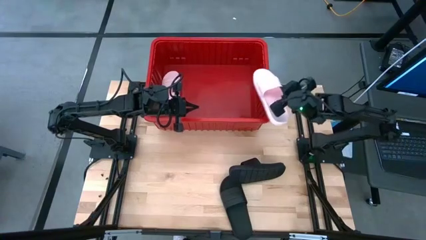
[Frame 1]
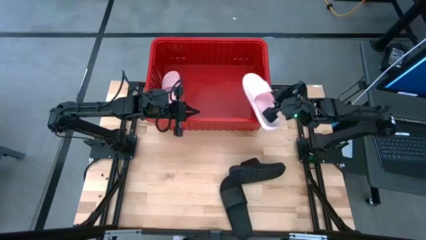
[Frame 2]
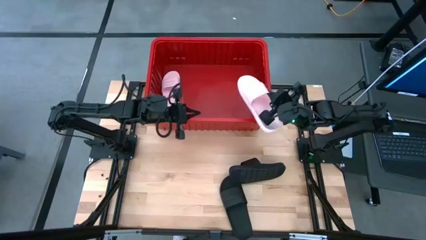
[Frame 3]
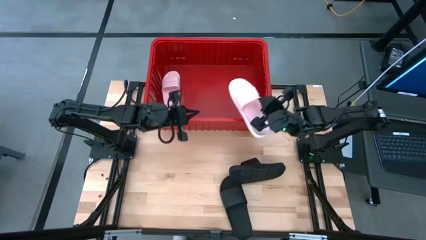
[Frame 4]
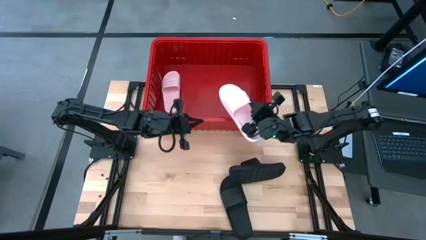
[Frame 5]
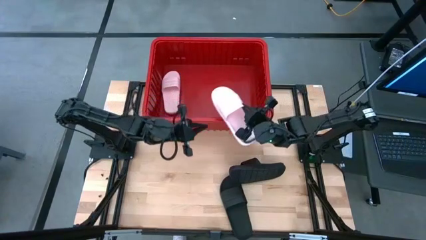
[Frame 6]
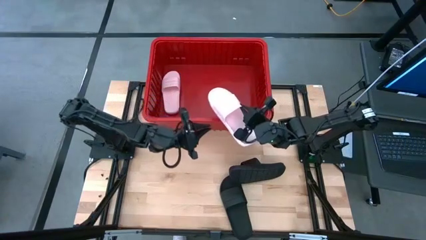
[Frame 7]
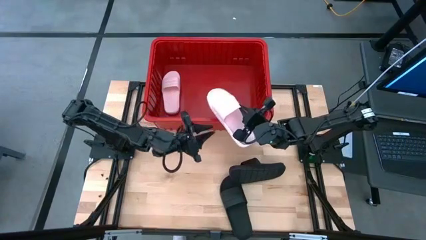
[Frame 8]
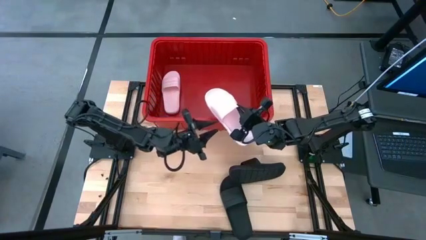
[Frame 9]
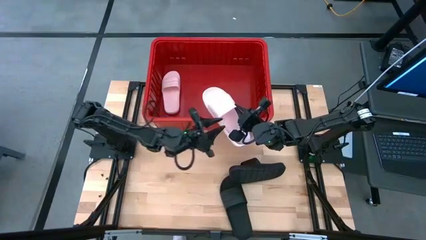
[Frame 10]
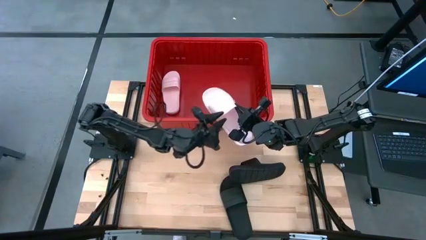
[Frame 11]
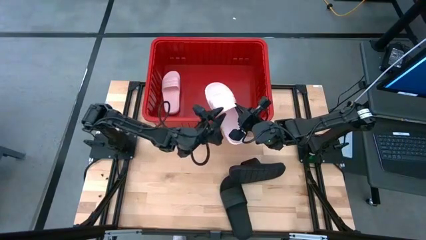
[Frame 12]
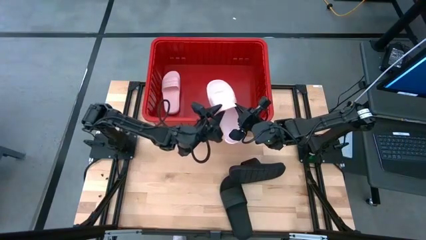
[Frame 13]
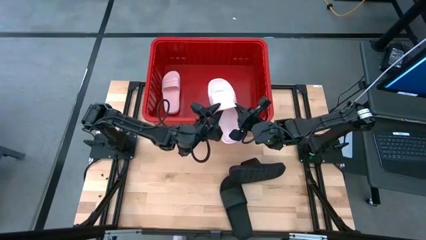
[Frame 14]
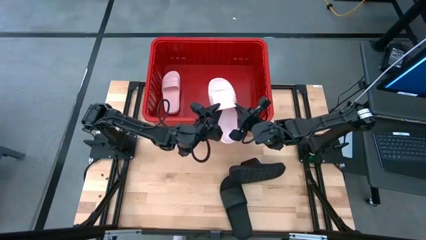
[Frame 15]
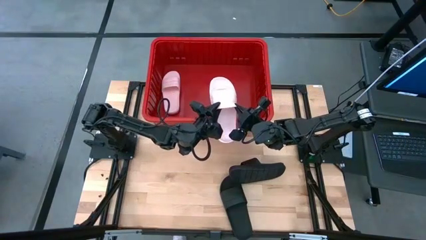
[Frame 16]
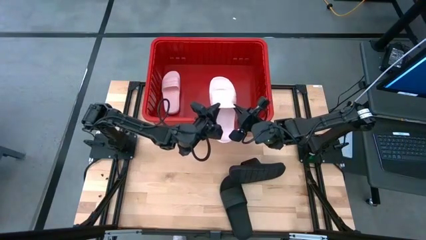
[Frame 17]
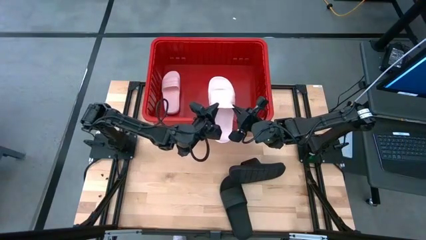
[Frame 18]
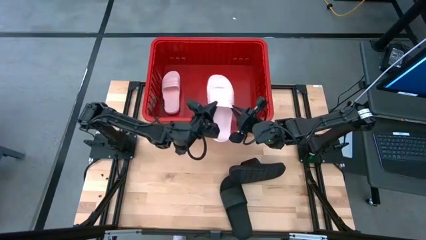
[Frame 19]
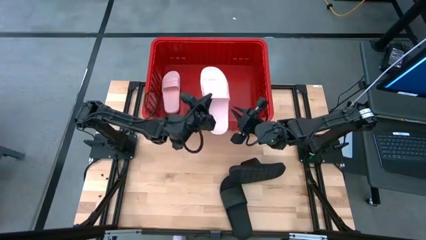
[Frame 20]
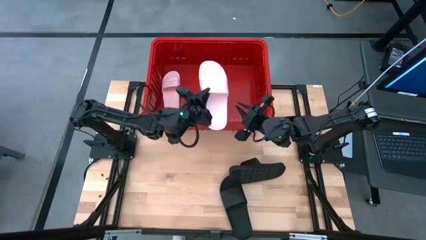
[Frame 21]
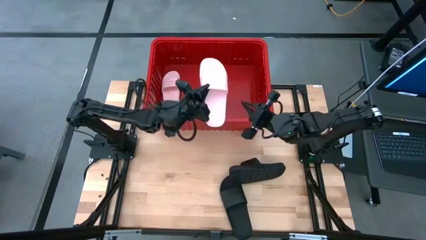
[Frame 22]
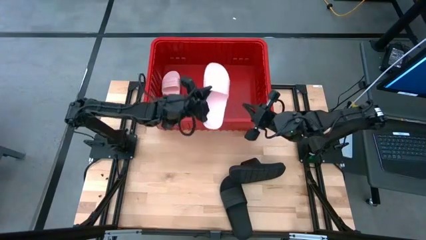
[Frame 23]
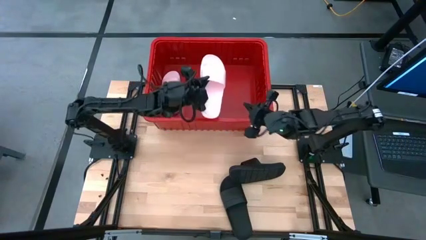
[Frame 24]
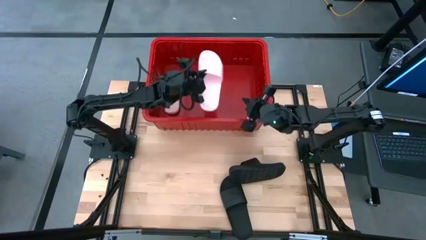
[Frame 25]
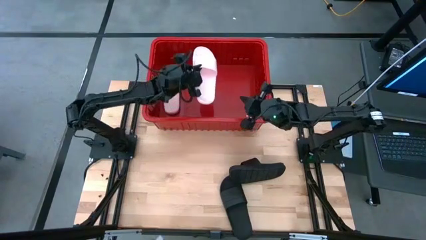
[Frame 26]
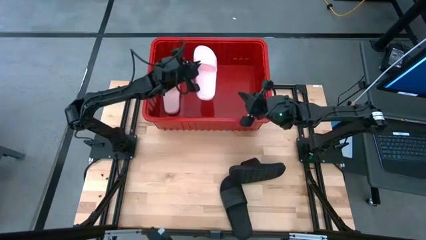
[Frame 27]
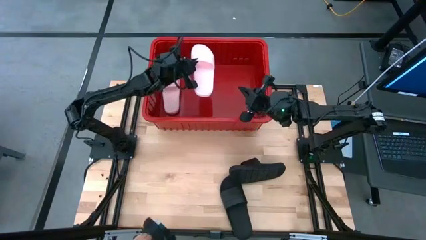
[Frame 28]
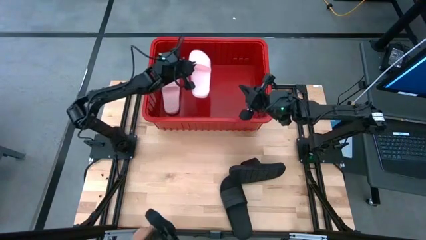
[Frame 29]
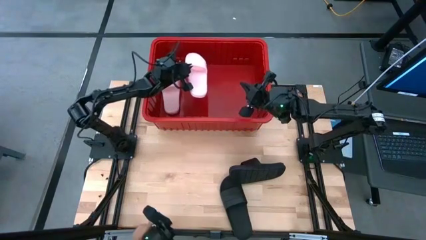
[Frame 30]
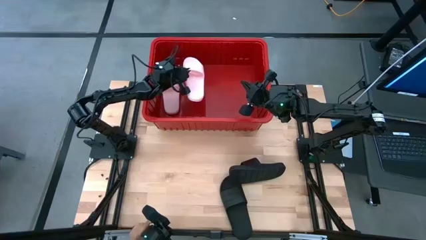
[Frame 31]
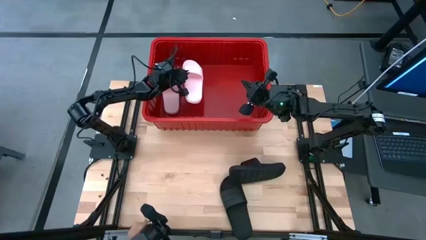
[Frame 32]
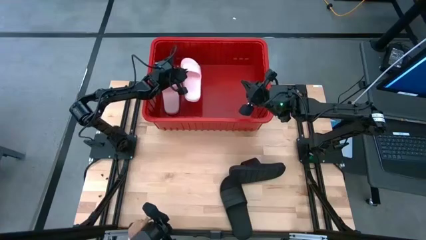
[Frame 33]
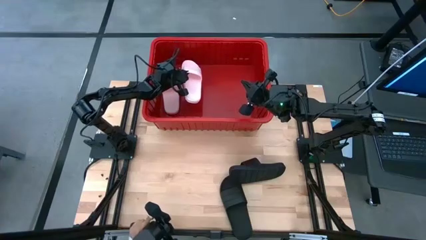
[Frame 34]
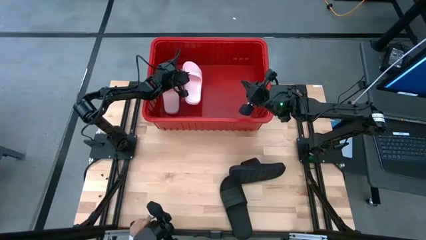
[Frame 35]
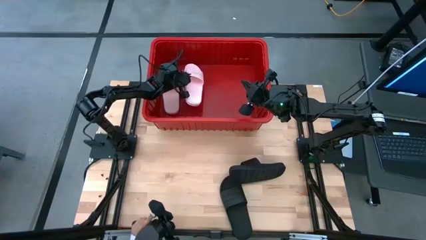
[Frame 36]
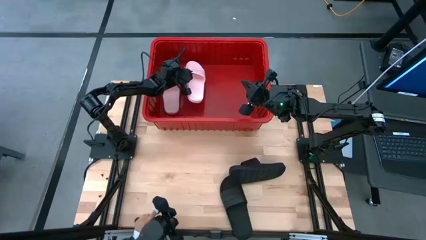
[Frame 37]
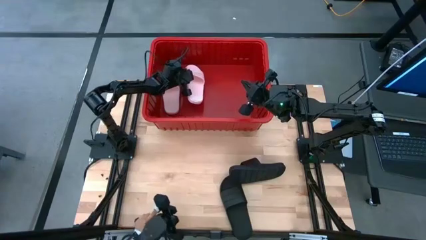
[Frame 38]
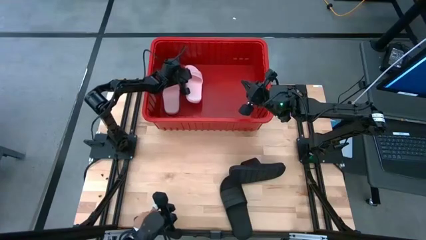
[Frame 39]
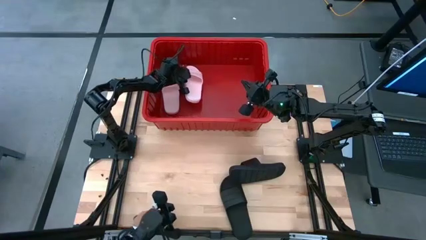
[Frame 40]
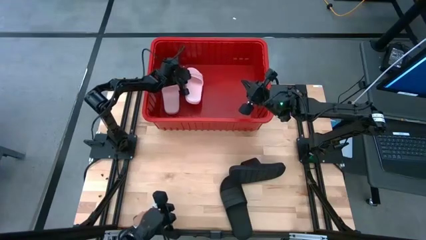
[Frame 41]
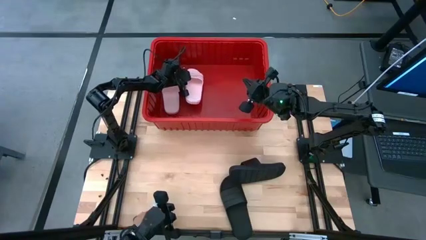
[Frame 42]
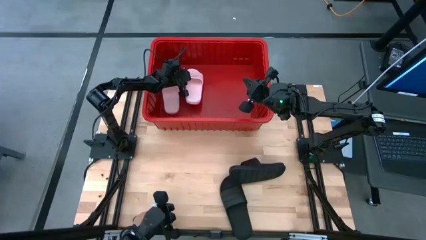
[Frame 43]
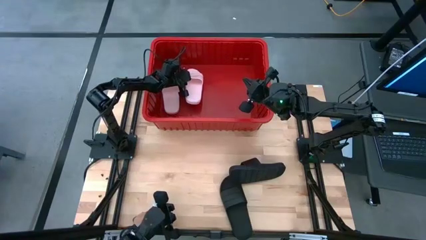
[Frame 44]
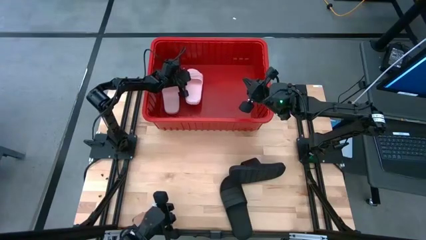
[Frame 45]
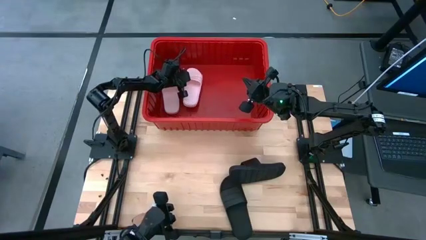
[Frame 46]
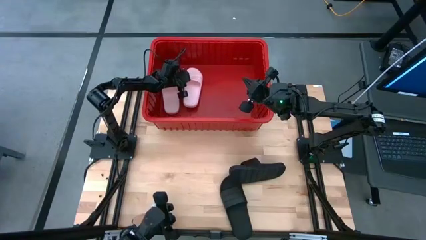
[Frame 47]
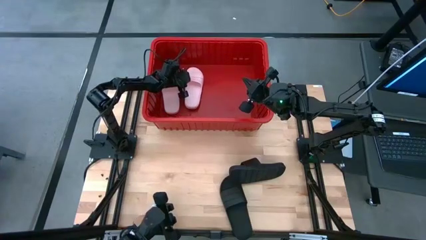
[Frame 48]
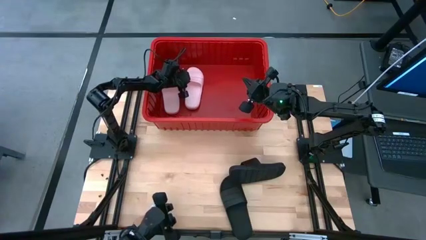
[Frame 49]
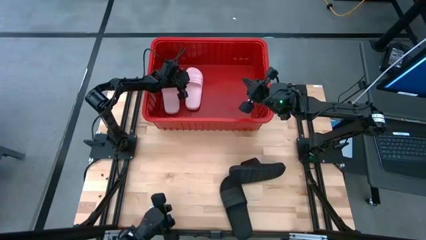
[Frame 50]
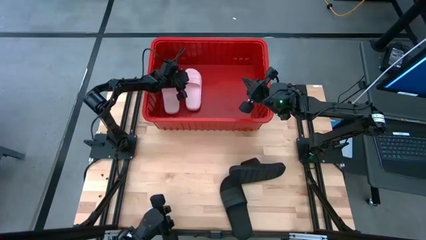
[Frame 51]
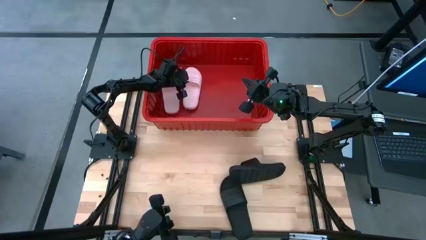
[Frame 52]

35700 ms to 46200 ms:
Task: Pick and place slides into bin
Put the pink slides into the red bin

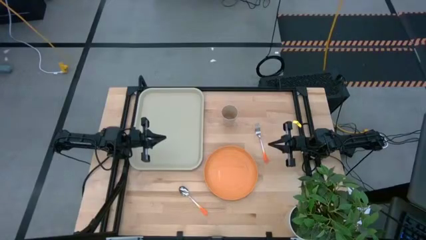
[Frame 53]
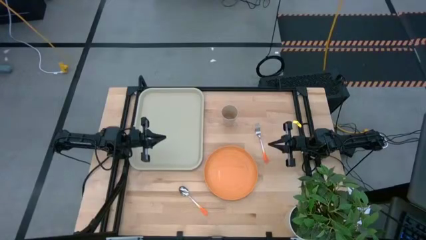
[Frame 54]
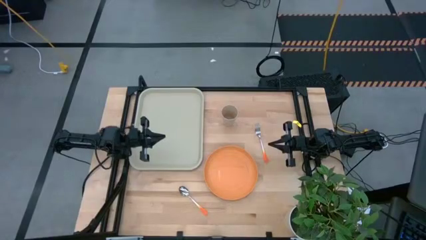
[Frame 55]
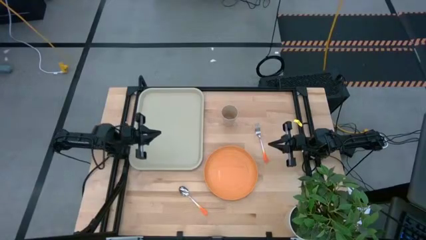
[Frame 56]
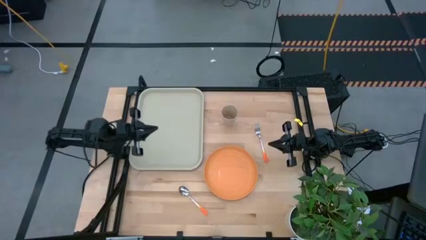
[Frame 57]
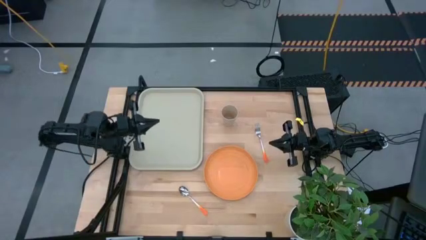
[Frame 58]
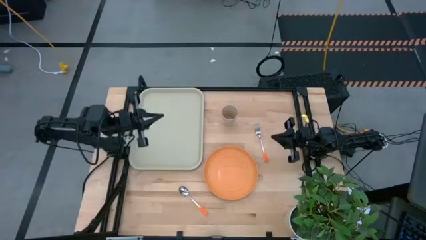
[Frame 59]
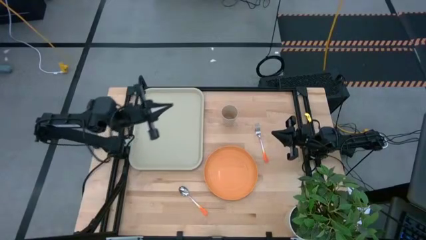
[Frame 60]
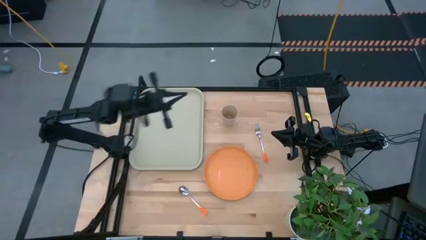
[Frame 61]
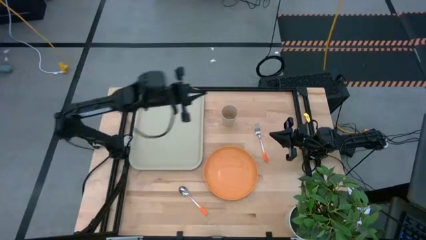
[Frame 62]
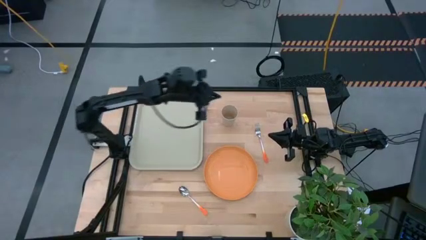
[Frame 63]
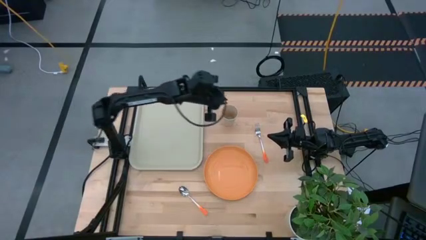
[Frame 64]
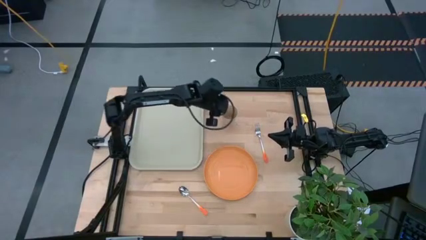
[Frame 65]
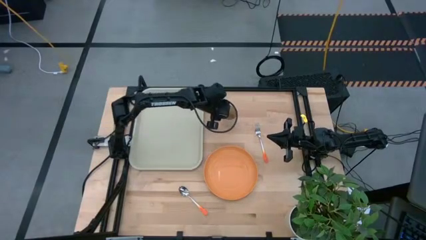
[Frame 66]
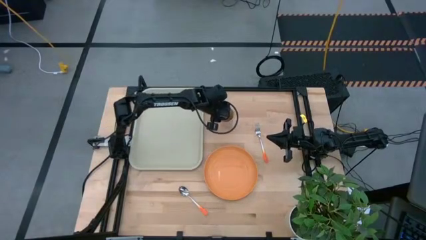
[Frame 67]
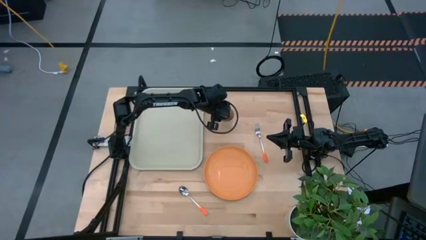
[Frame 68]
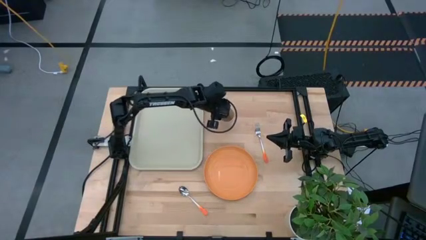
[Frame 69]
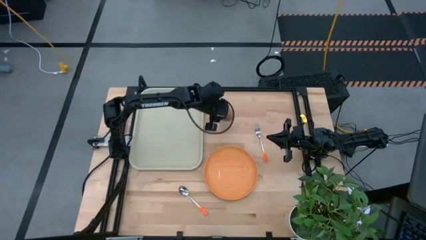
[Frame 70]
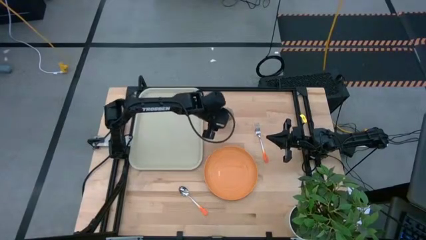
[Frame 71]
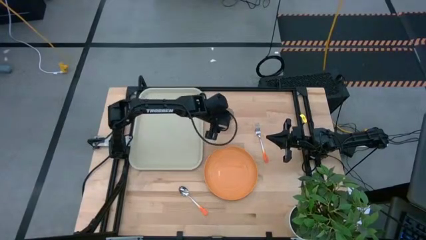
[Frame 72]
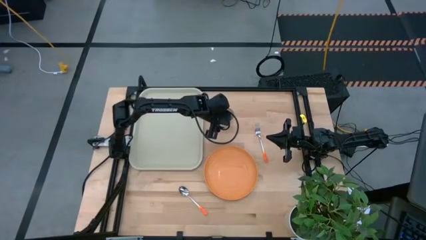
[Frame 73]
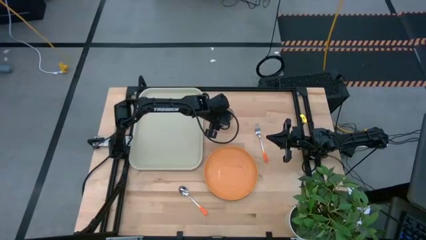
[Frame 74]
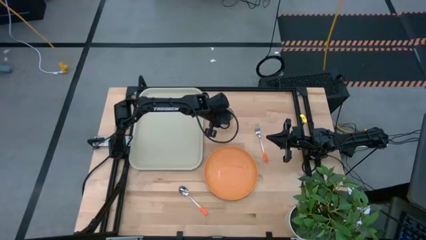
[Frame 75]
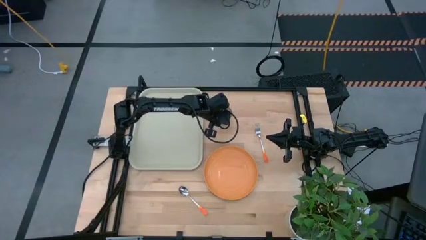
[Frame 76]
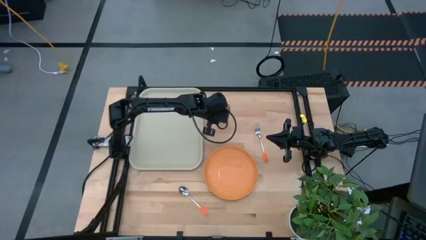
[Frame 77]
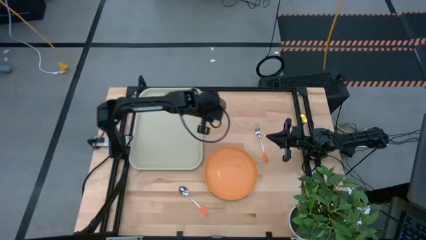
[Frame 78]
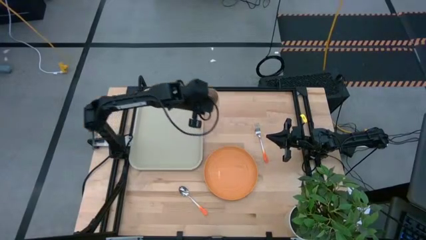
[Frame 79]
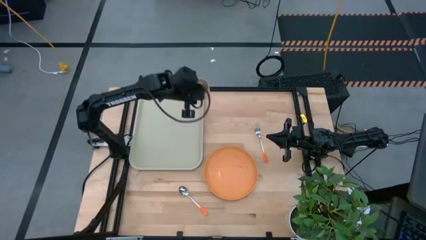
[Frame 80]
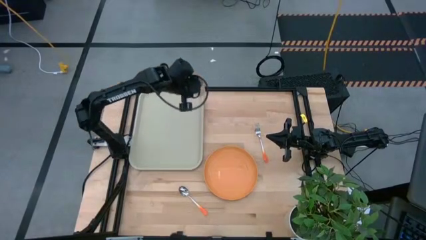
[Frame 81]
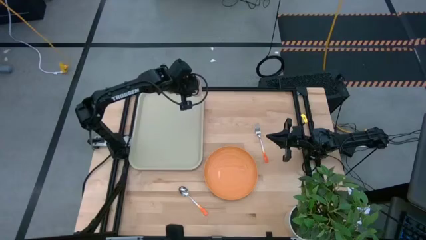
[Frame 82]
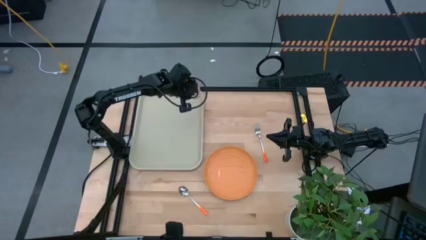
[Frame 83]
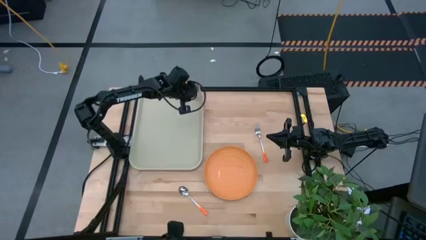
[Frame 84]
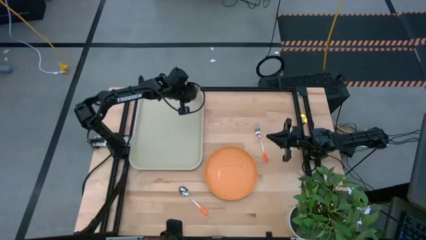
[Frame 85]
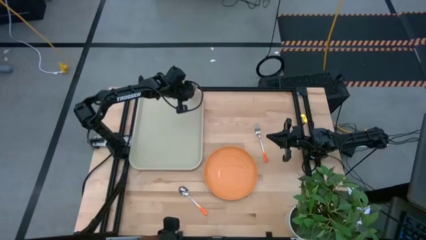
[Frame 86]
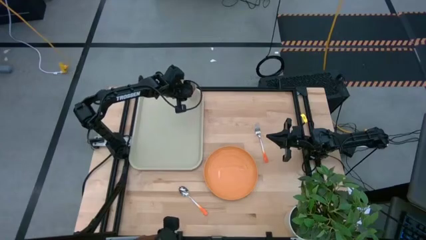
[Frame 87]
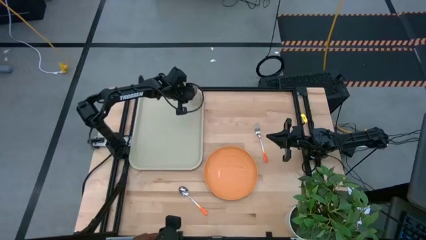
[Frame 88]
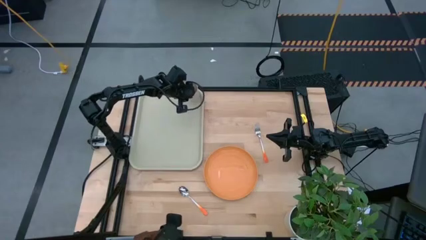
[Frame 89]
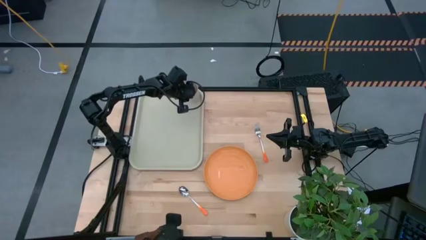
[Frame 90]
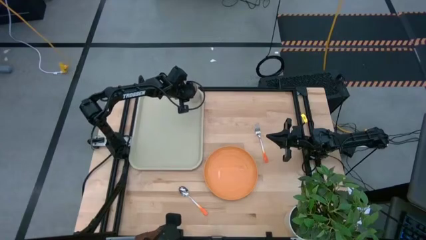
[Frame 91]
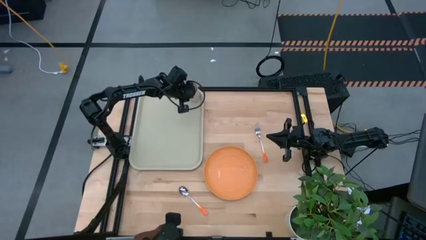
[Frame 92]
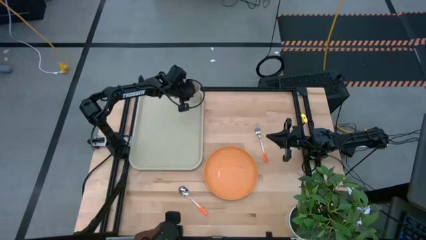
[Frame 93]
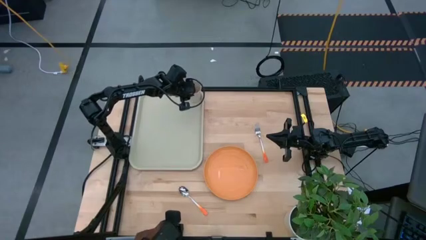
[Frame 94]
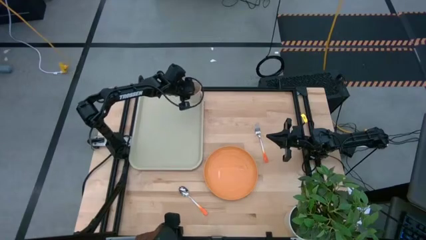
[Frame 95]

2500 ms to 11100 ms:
Task: Pick and place plate/cup/fork/spoon on tray
Put the light brown cup on the light brown tray
